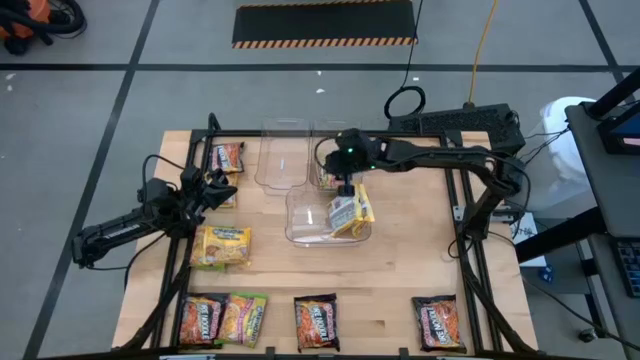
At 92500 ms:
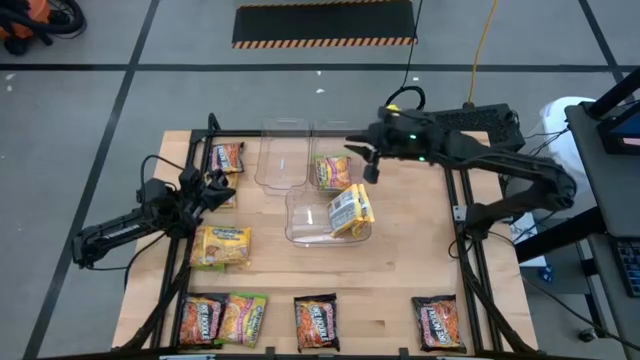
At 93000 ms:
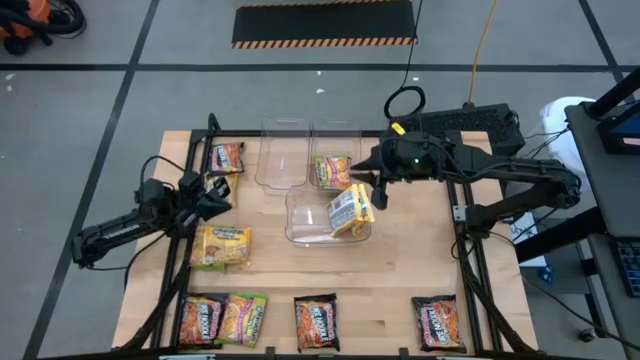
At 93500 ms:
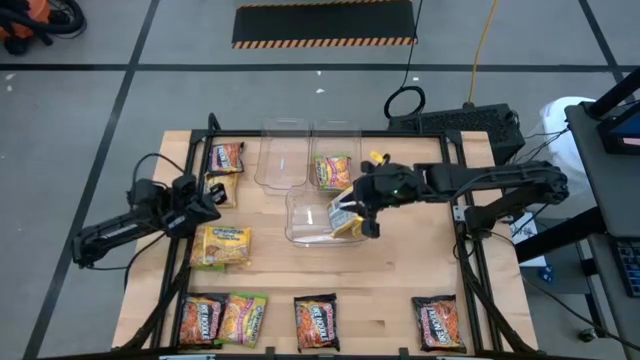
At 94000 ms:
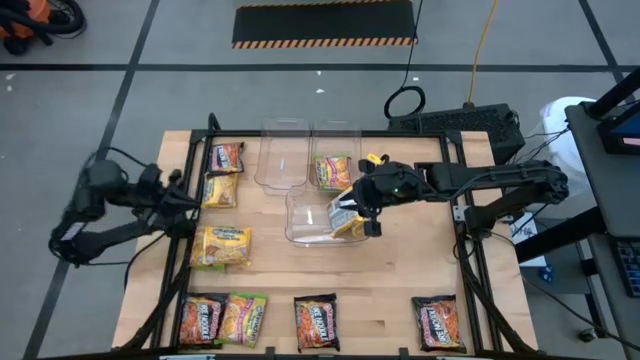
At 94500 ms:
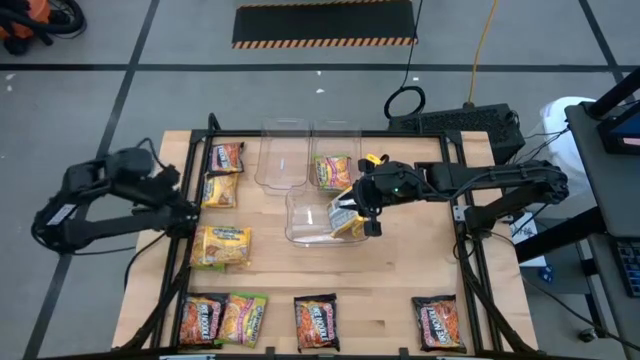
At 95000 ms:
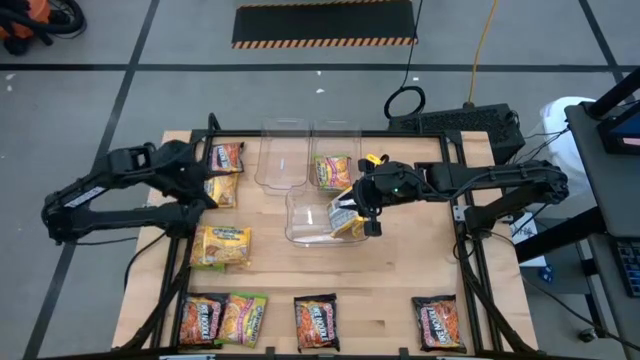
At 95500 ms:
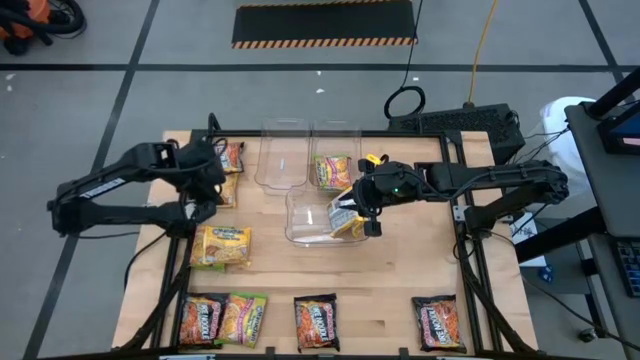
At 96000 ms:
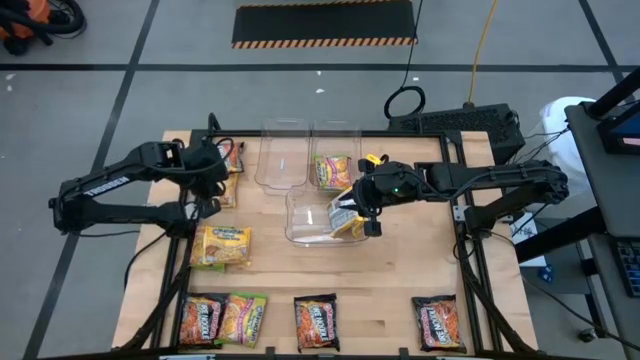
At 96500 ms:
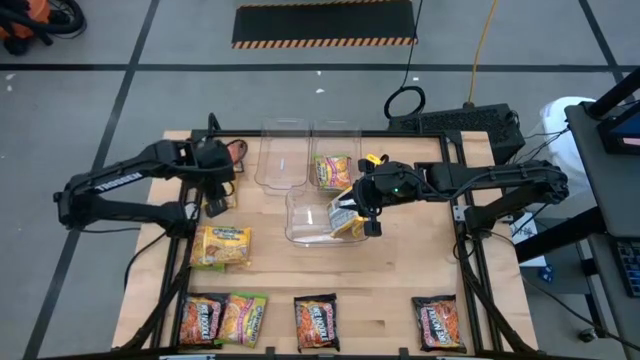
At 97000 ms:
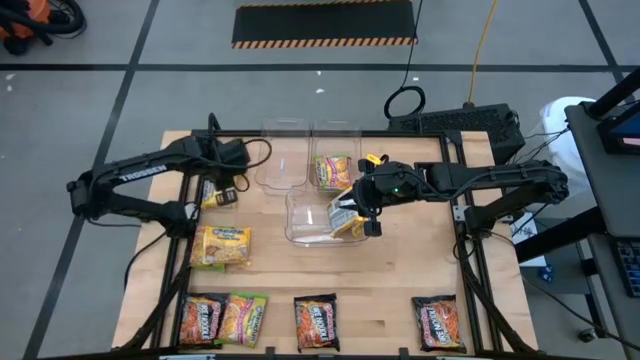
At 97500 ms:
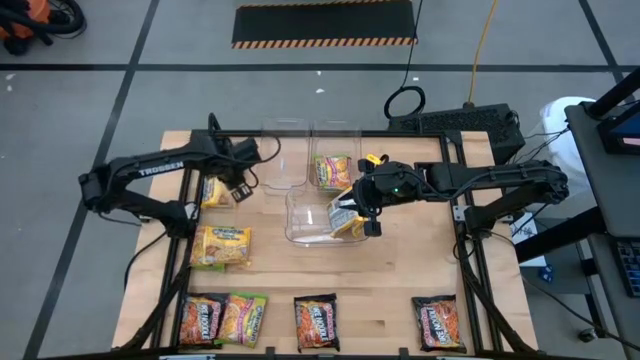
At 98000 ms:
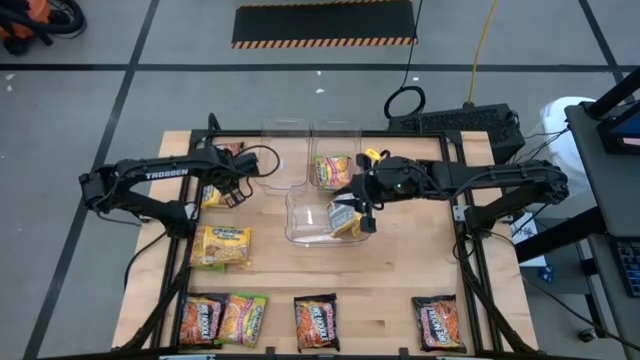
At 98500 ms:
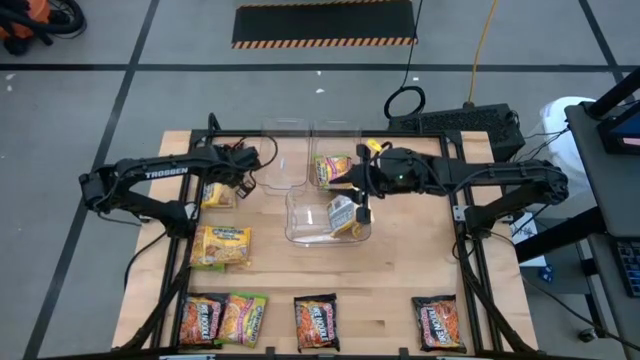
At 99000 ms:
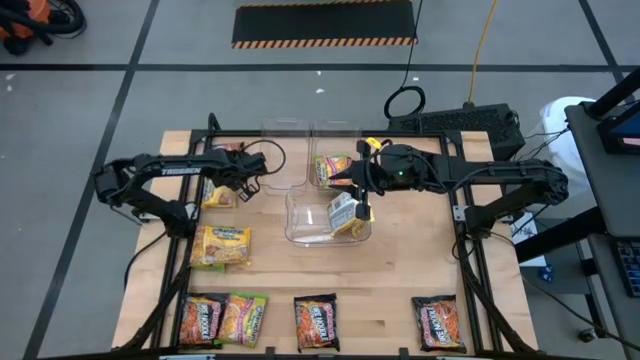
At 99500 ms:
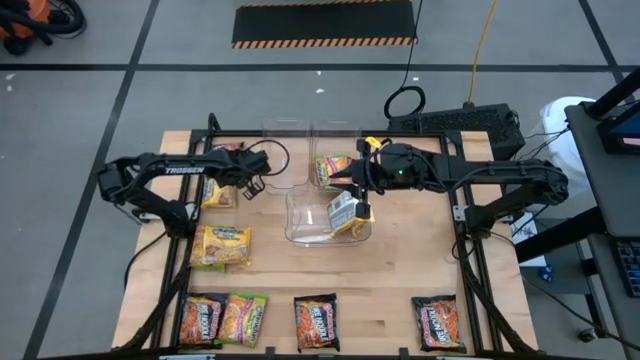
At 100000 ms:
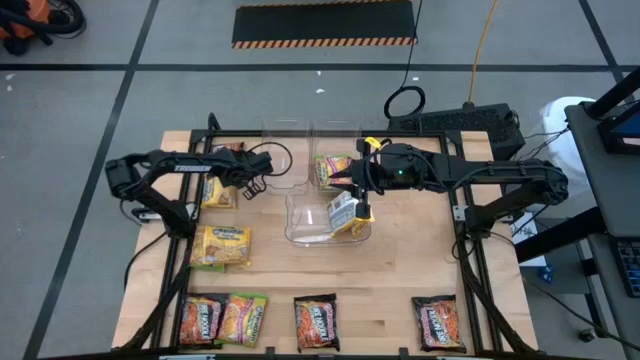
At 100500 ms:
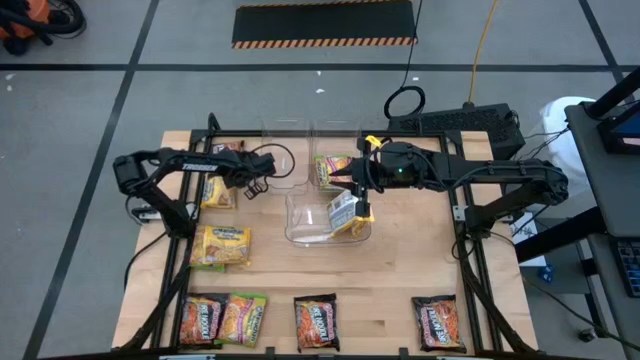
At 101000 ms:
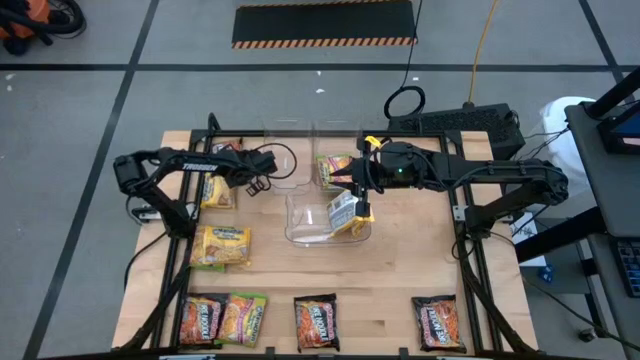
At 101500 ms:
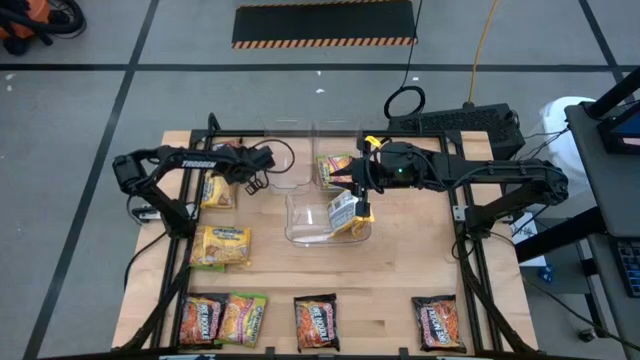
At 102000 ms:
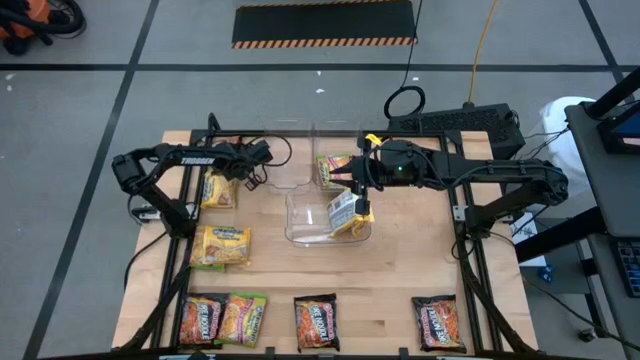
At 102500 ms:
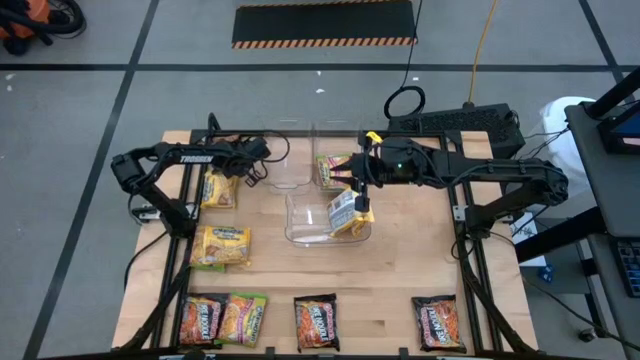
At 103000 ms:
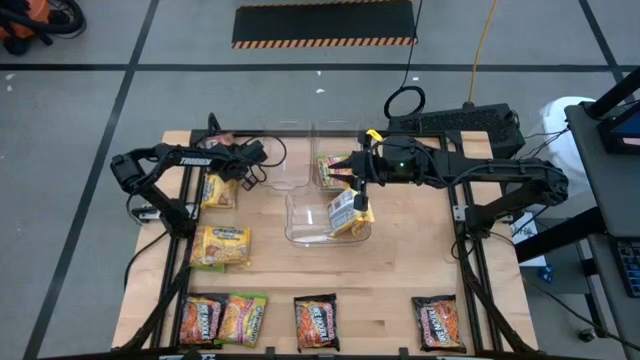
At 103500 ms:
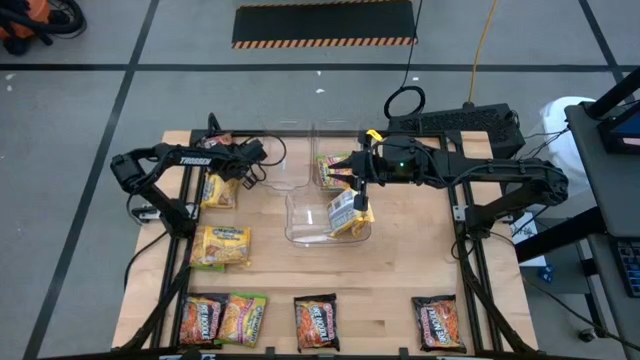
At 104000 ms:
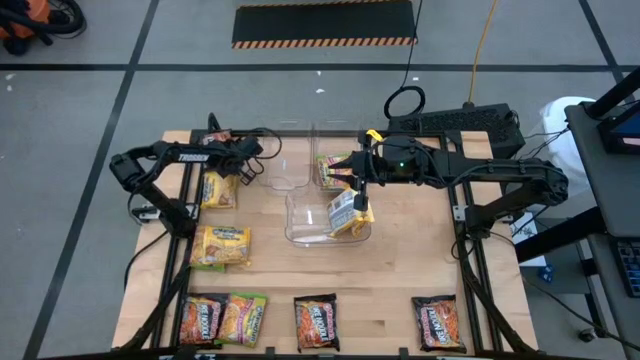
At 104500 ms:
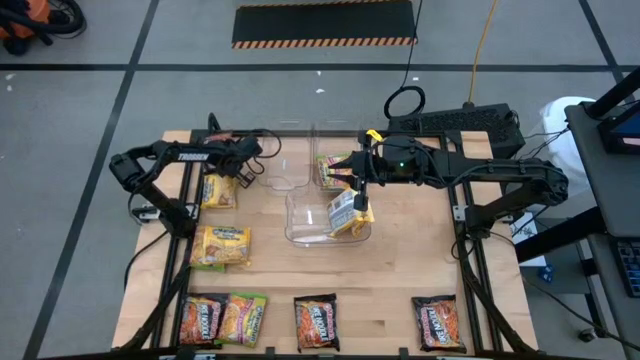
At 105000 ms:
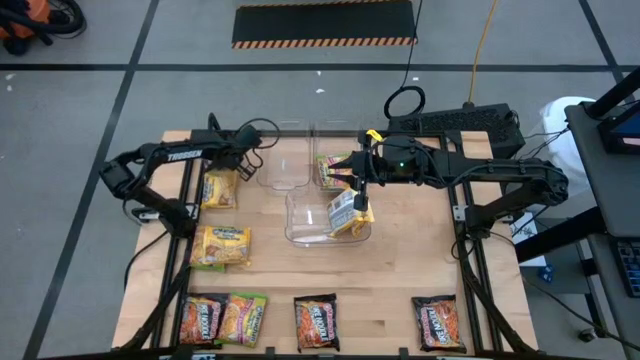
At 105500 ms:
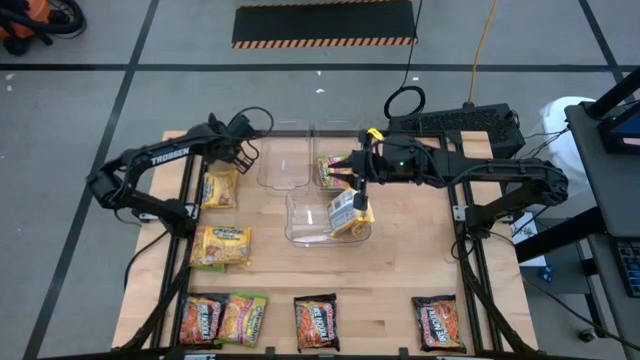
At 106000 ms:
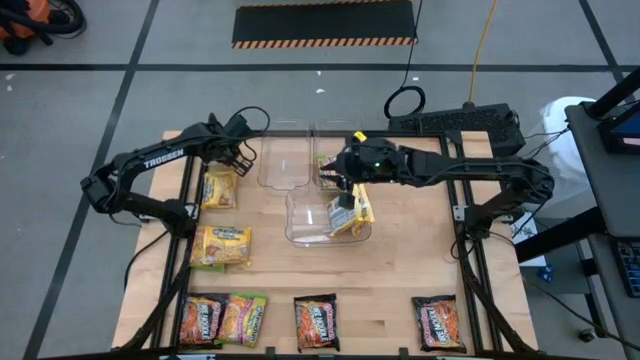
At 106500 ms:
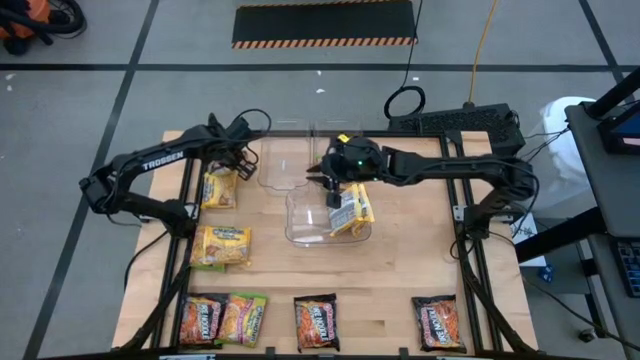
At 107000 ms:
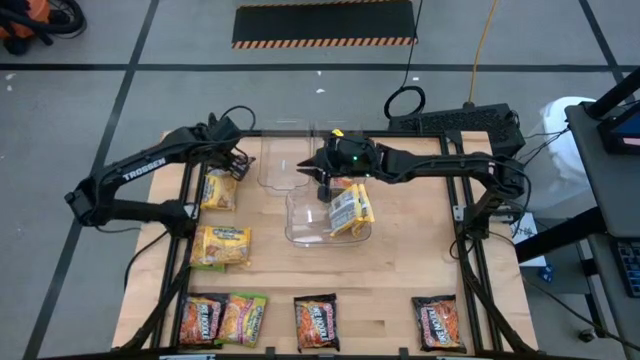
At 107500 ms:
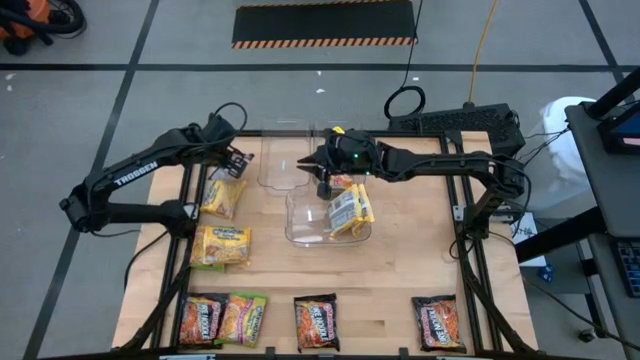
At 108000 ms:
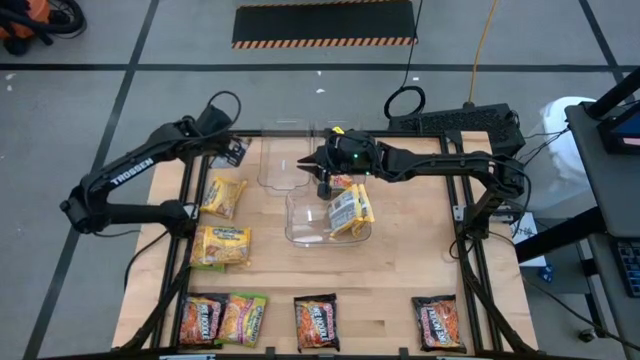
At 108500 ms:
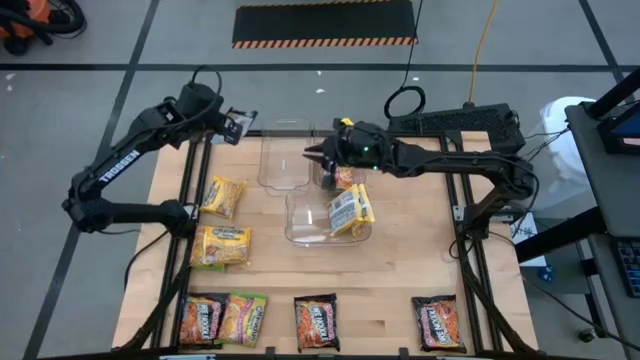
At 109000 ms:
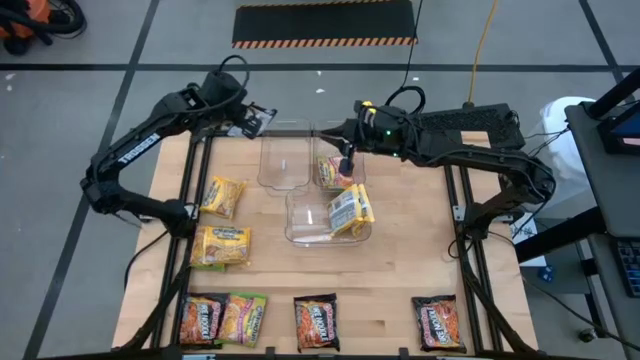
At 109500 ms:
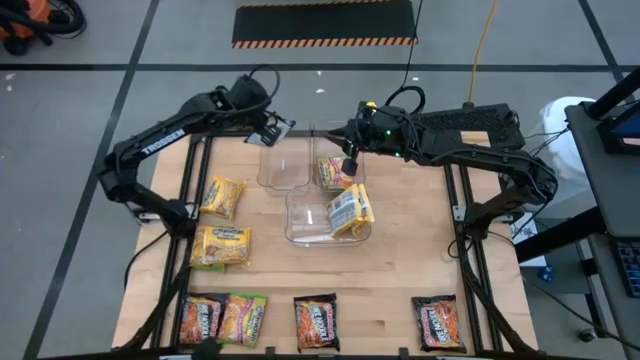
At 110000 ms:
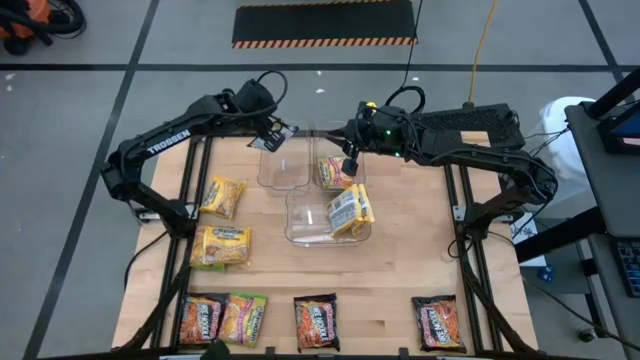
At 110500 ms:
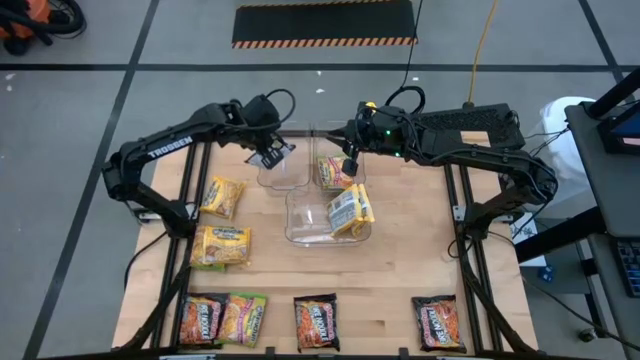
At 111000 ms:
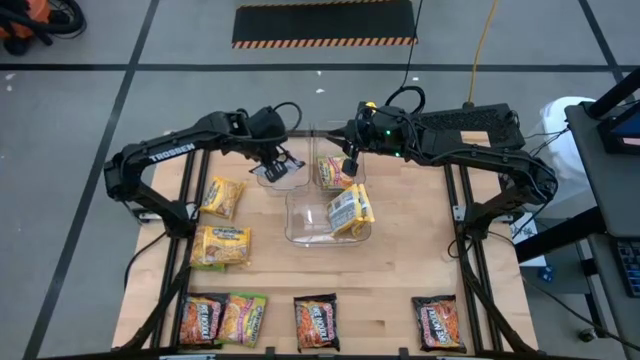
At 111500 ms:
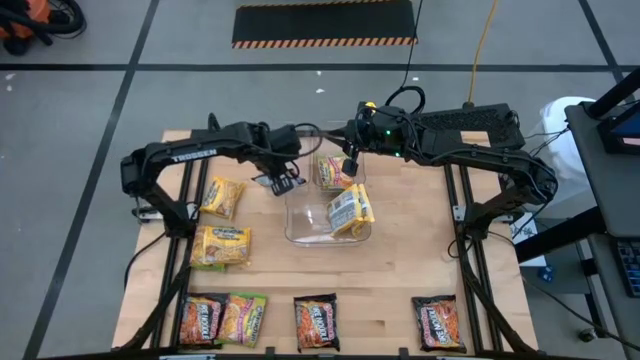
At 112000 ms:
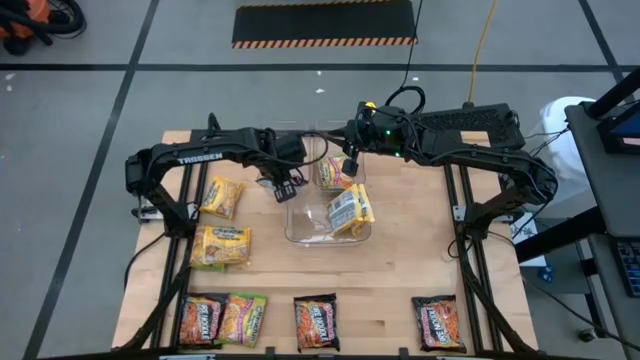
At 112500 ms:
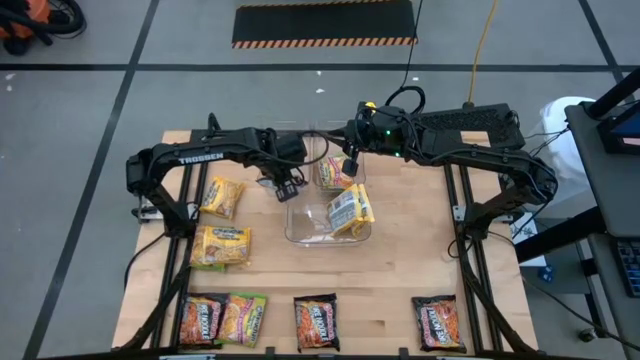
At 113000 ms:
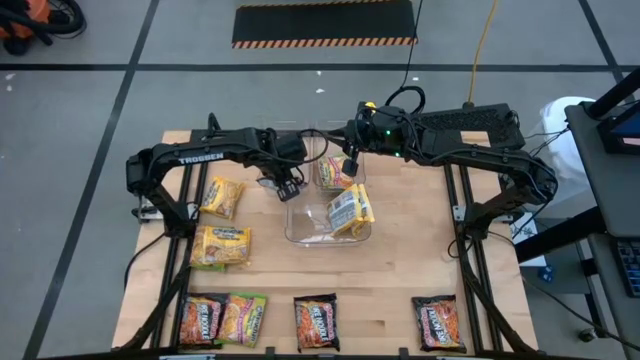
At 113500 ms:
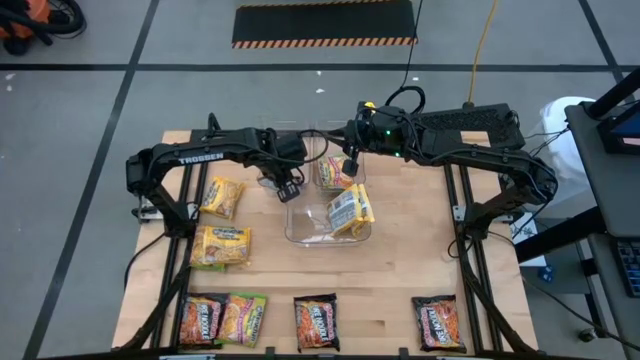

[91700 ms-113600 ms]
Task: Sort Maruchan noodles
Put the black noodle pack into the top left transparent bin
